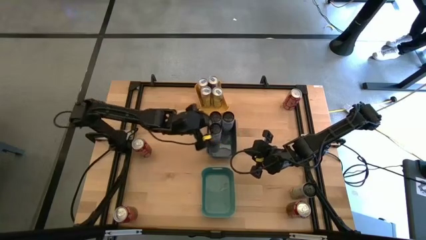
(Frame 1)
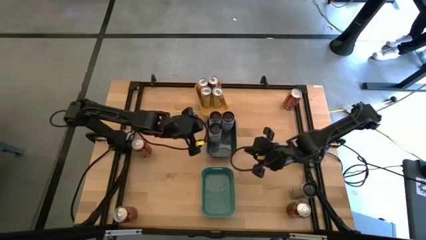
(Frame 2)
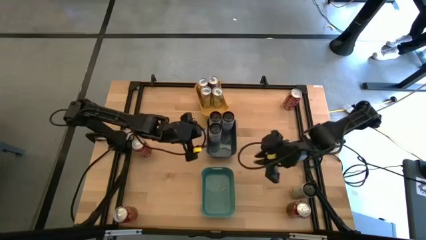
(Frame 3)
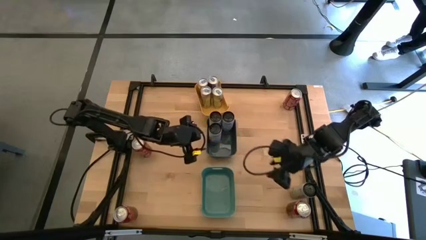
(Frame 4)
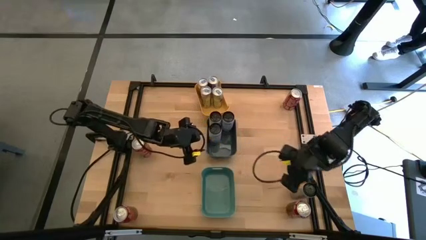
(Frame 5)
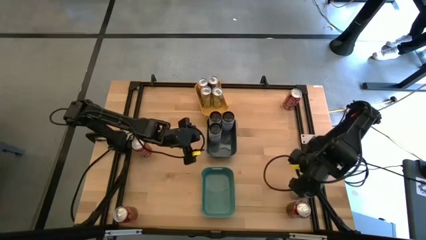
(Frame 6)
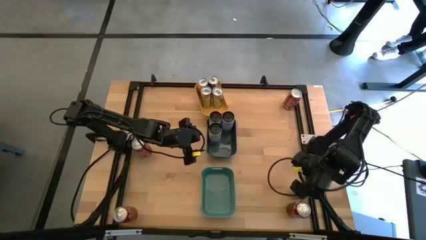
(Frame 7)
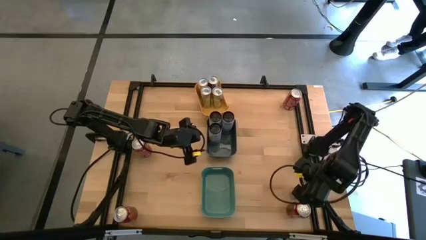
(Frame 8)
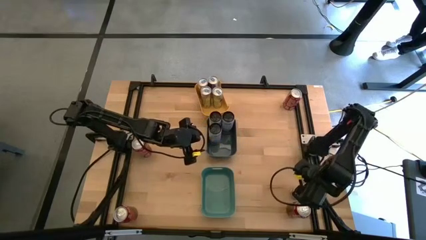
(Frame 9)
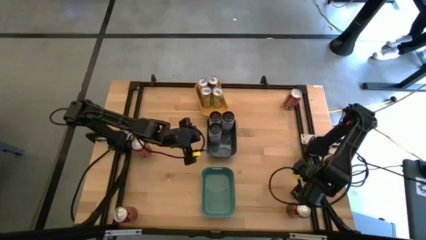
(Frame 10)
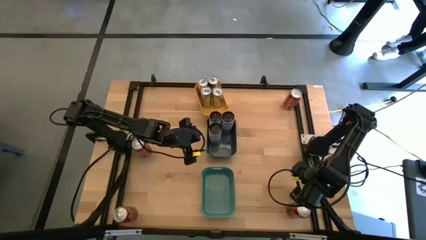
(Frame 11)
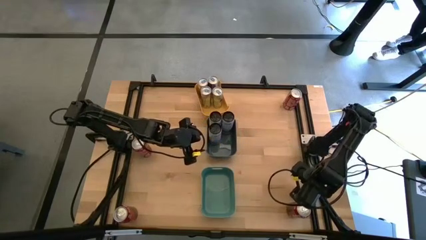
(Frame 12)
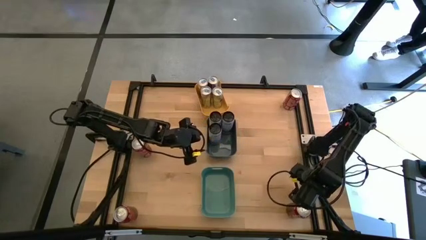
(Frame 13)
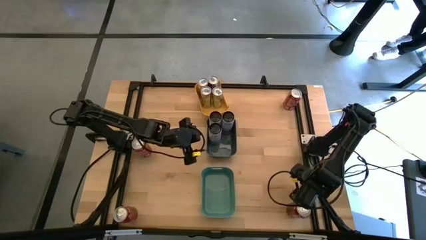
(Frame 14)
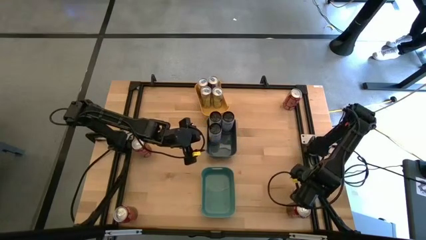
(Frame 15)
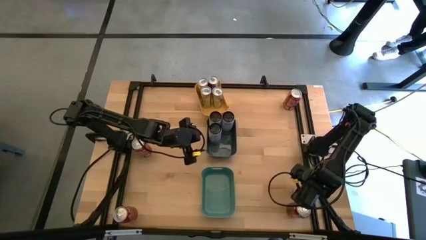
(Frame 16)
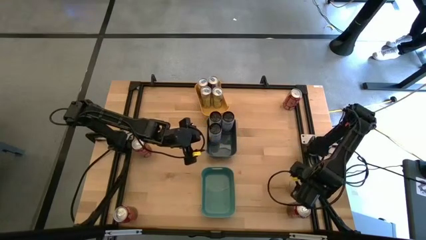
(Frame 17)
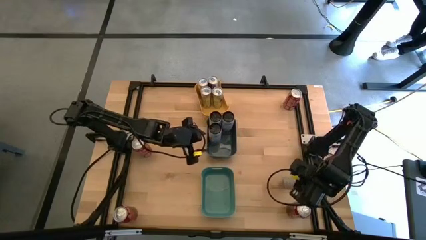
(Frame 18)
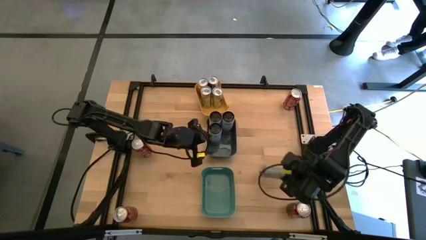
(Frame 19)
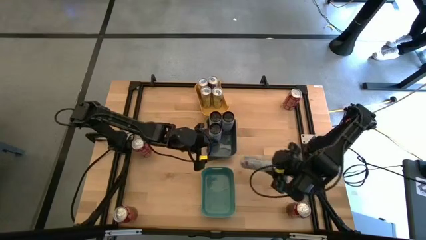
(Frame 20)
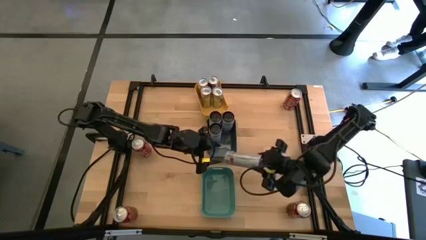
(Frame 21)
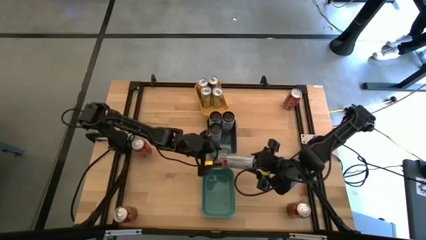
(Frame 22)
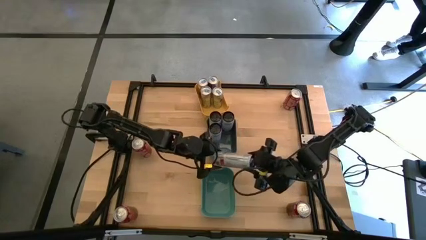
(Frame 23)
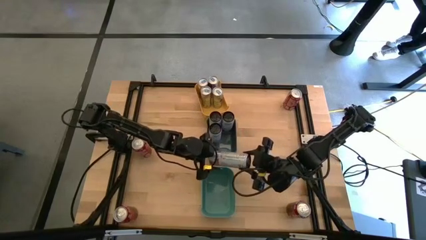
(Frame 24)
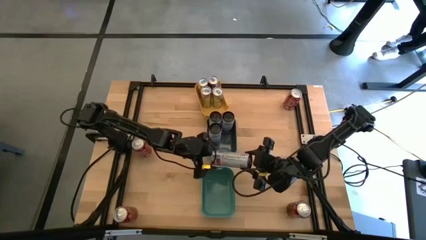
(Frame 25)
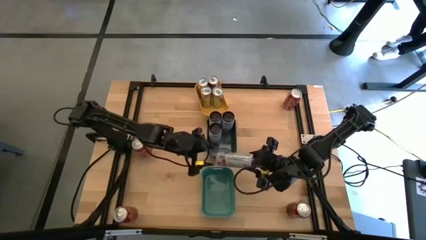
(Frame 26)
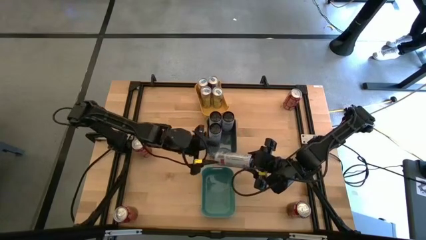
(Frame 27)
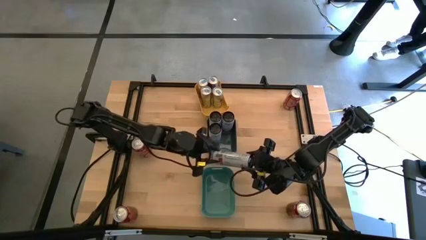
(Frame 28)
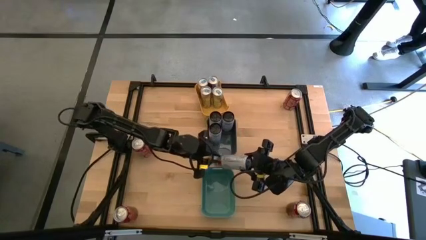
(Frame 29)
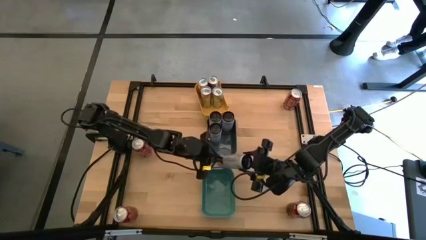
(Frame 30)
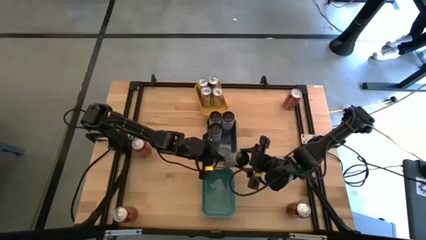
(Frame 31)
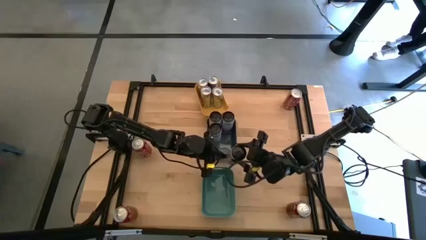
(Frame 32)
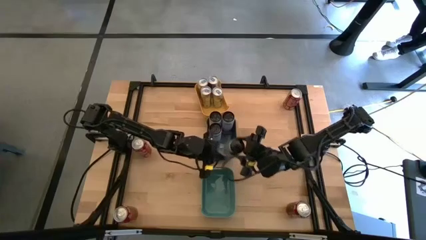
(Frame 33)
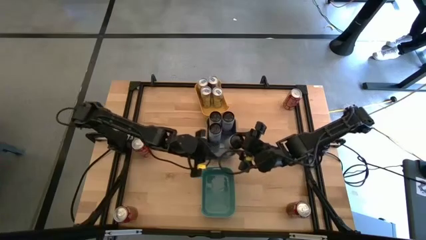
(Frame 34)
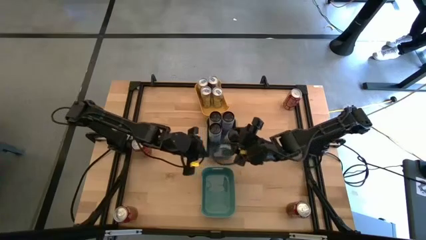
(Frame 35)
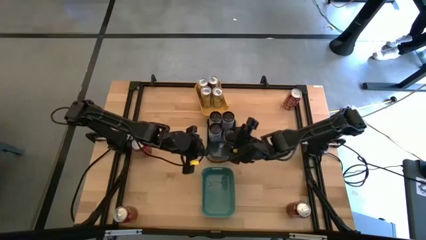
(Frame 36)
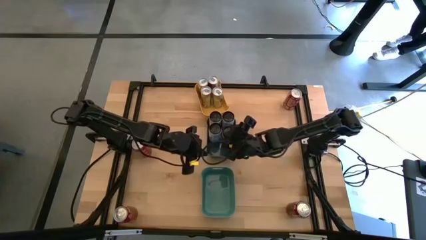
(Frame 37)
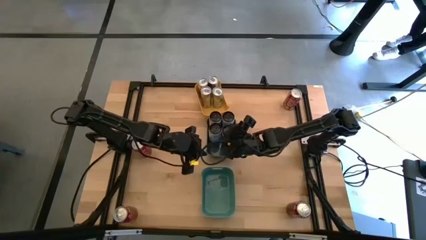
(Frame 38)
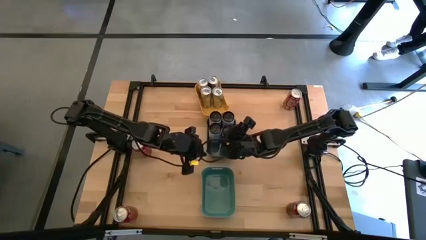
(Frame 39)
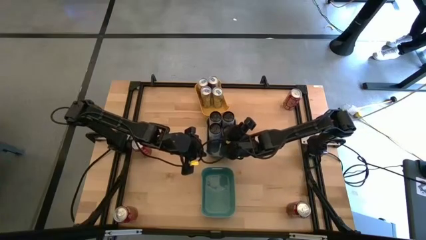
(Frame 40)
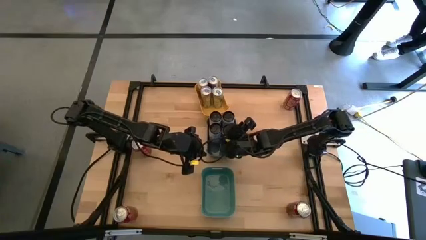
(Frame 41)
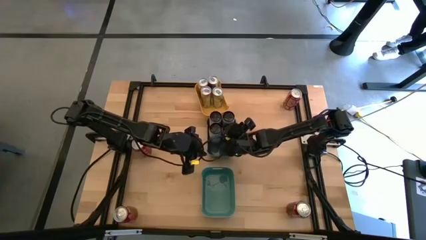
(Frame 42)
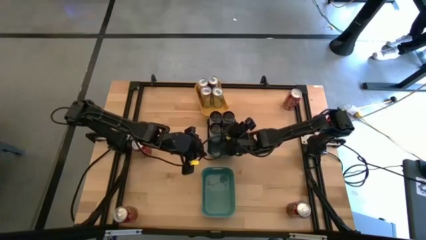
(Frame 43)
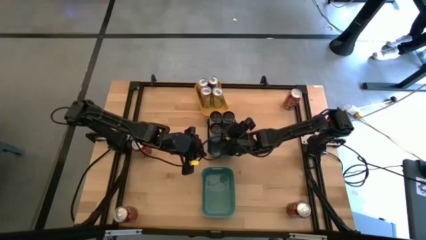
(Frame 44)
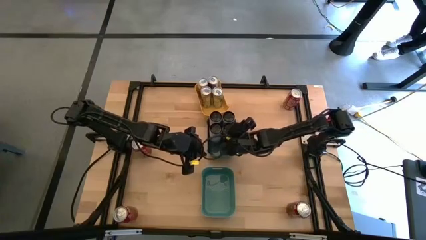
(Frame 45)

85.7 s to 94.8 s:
Task: Sort soda cans
Put the black soda can into the dark green bin

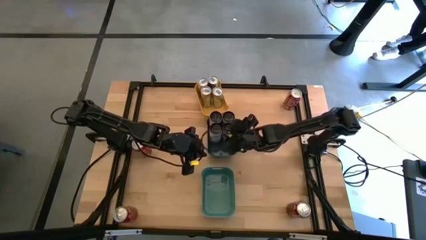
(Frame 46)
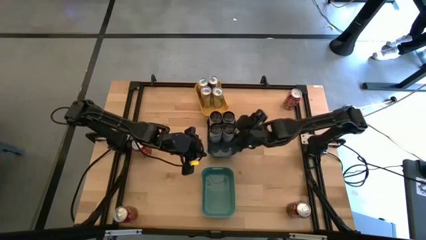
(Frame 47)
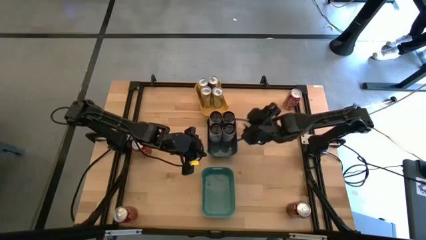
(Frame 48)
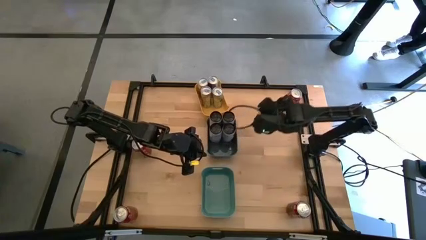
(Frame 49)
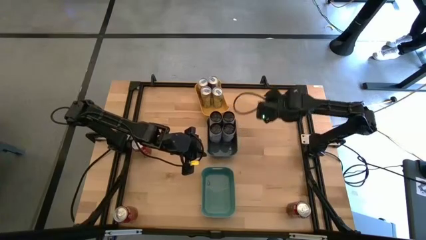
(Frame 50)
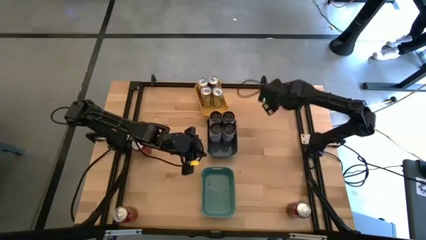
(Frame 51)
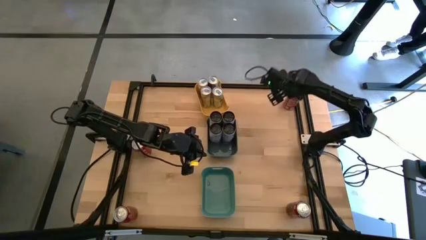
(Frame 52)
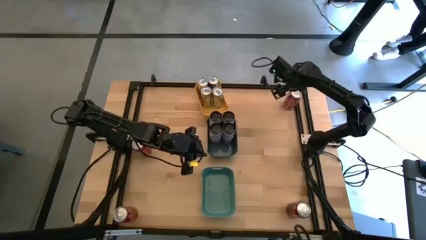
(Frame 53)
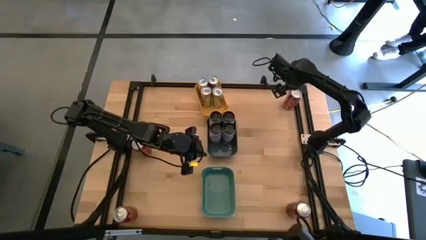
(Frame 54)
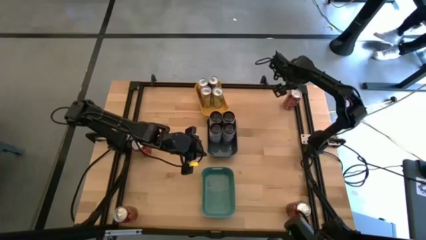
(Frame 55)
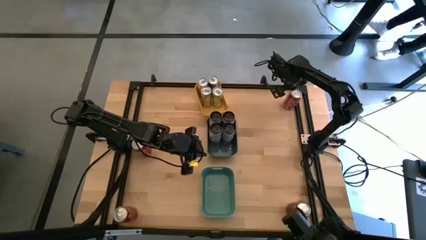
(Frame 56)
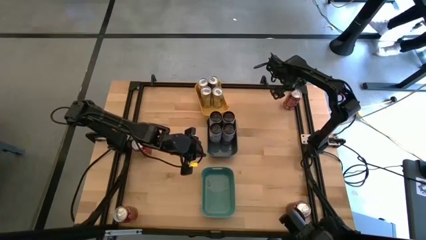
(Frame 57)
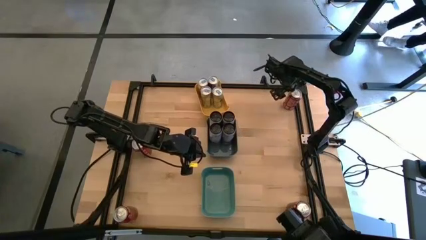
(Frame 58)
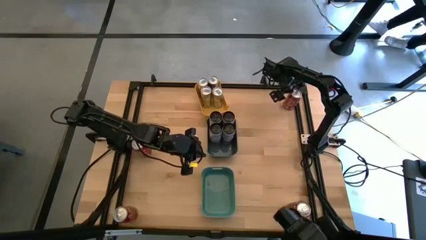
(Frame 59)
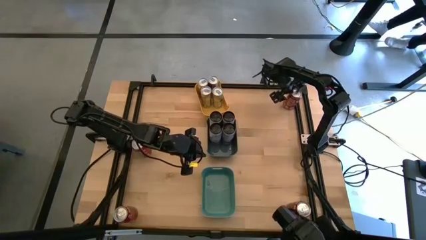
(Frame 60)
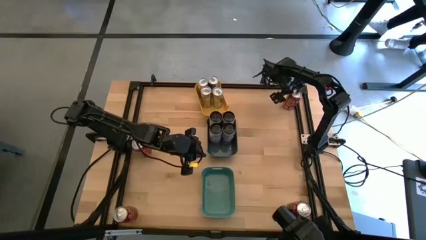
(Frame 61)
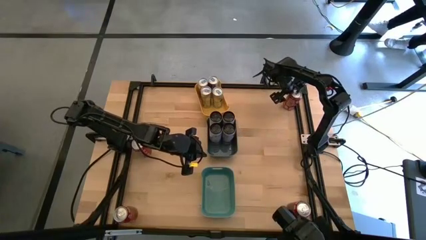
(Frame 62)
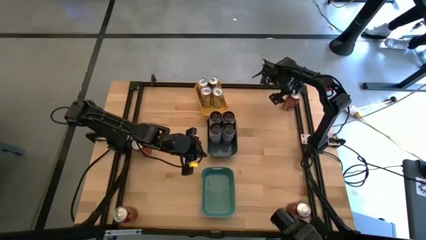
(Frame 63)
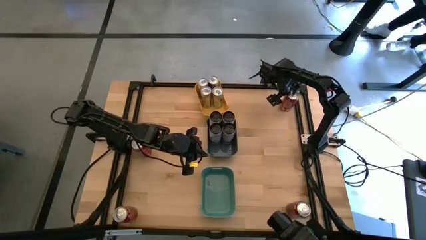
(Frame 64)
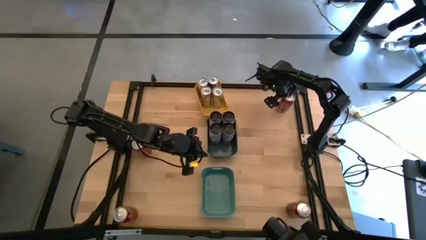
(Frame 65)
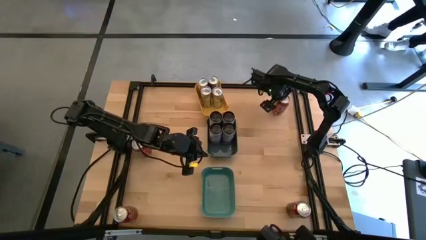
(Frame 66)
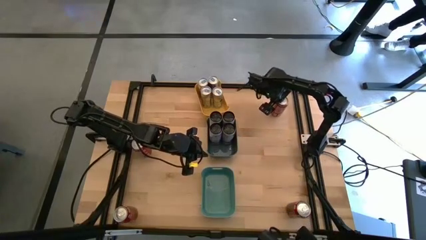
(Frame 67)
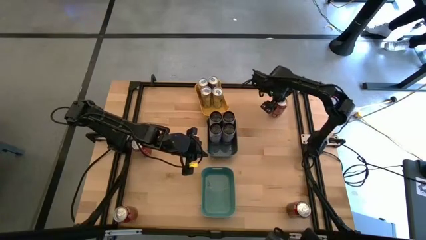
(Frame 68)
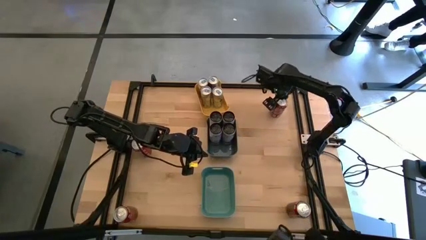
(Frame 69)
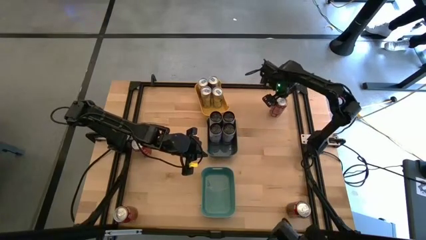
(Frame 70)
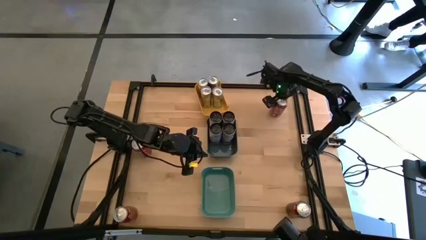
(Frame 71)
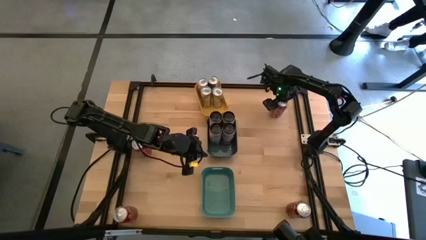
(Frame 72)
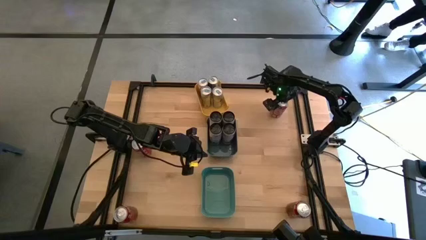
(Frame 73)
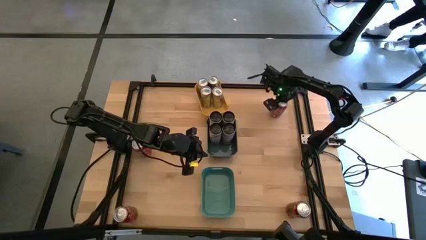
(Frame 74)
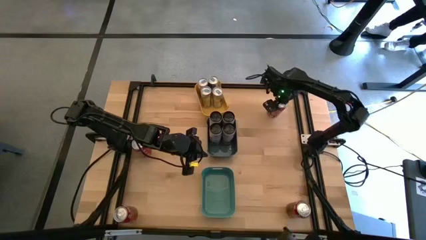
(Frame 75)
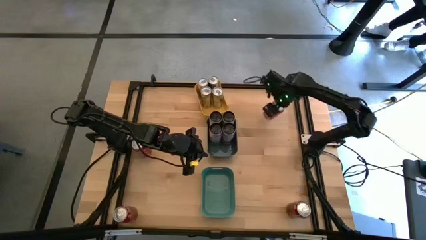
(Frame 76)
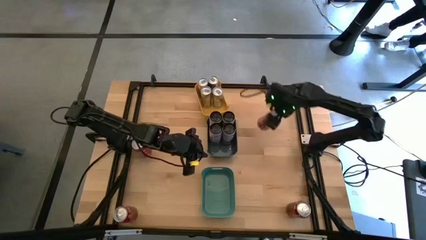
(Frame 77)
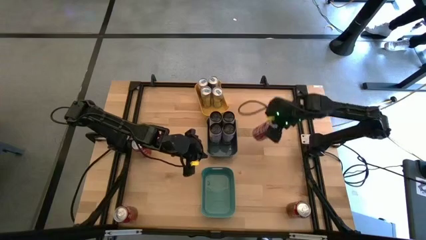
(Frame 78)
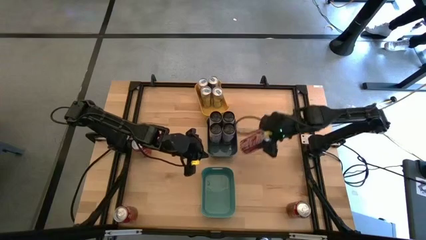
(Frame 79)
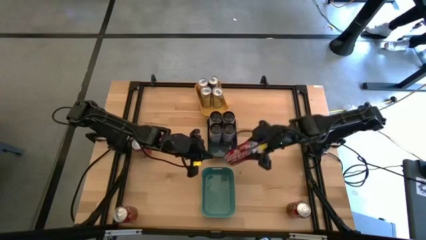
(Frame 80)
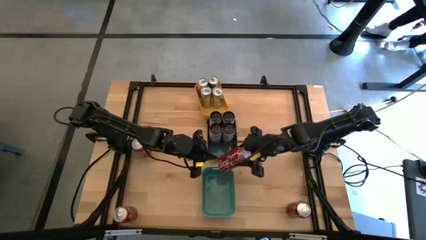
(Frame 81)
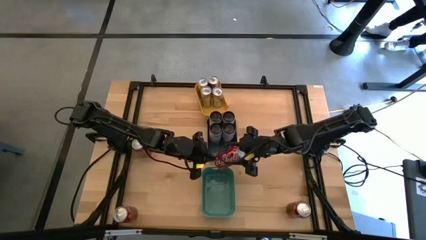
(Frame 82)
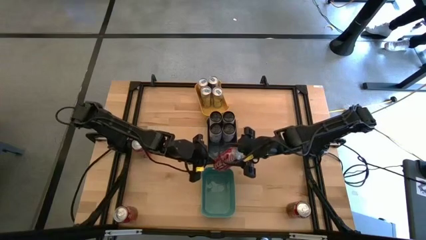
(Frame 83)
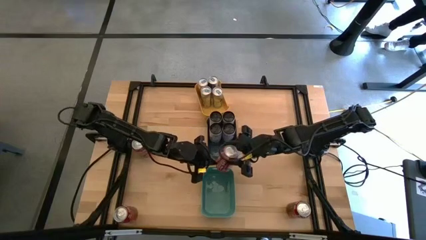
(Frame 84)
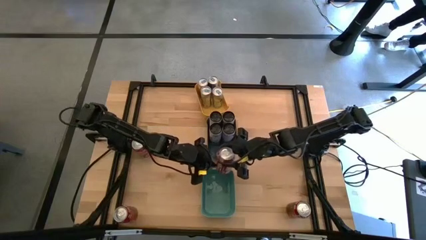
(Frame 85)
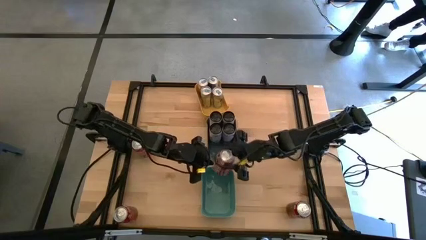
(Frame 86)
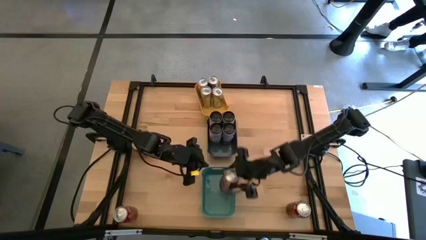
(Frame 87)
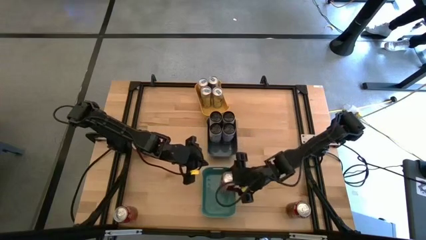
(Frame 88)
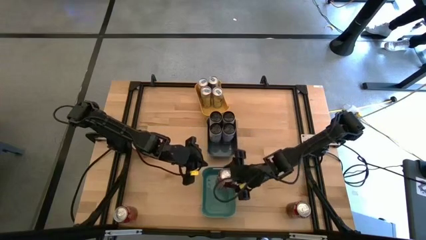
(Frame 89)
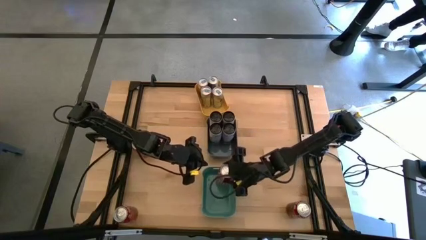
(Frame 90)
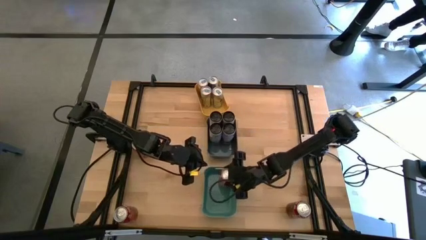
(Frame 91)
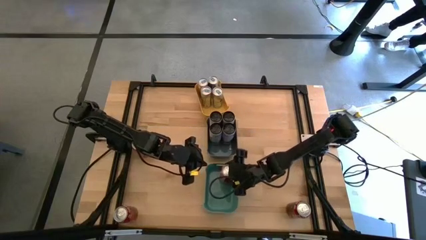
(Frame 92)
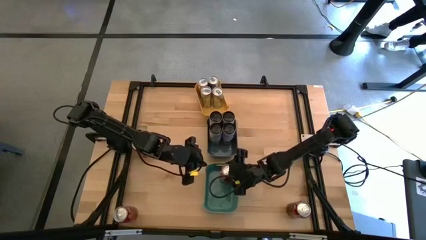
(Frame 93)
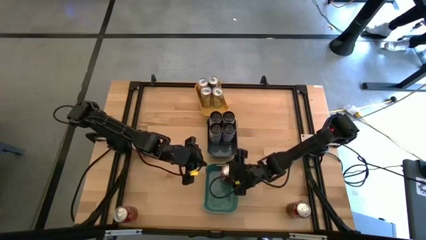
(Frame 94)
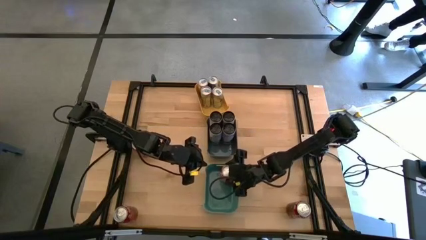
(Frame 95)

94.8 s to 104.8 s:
Put the top right red soda can into the green bin
